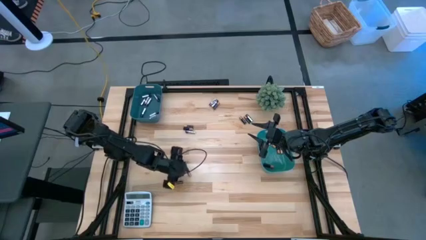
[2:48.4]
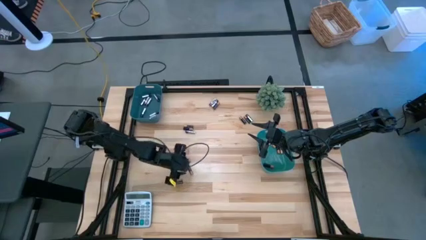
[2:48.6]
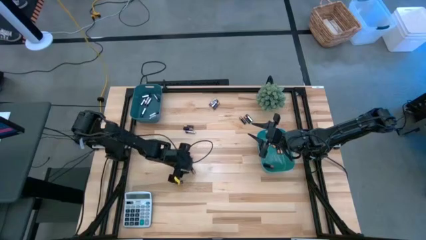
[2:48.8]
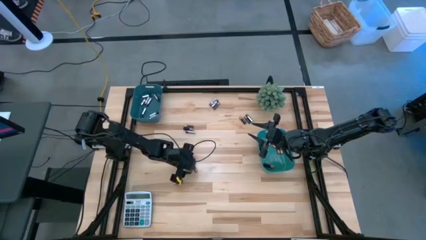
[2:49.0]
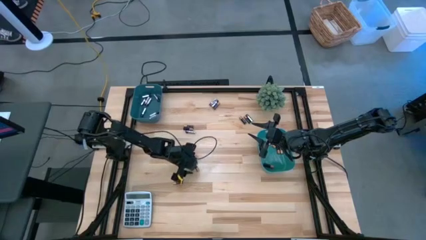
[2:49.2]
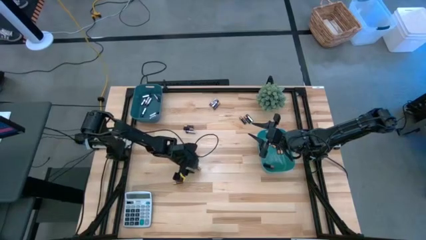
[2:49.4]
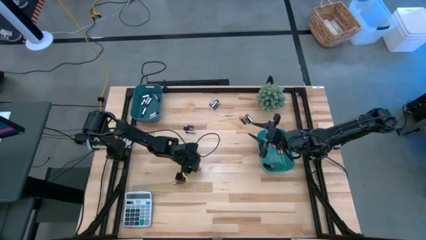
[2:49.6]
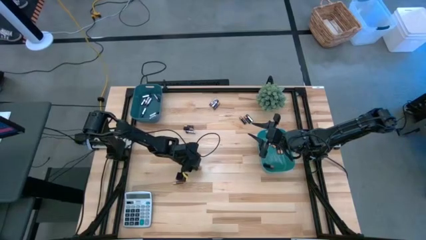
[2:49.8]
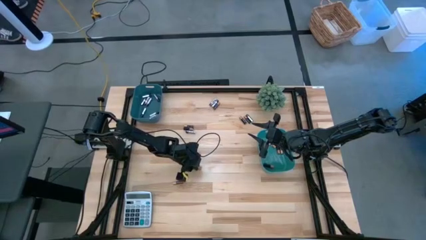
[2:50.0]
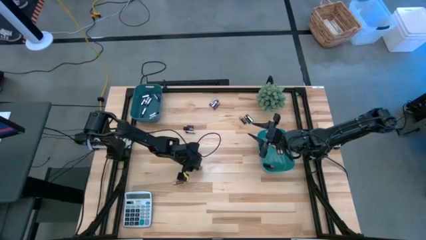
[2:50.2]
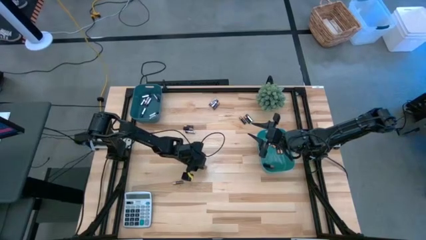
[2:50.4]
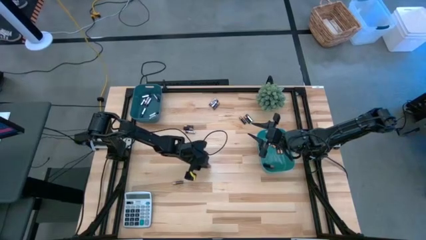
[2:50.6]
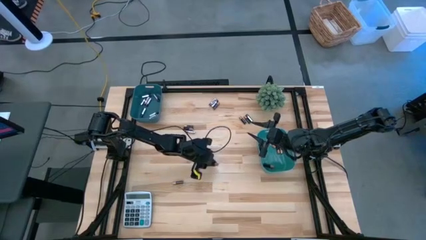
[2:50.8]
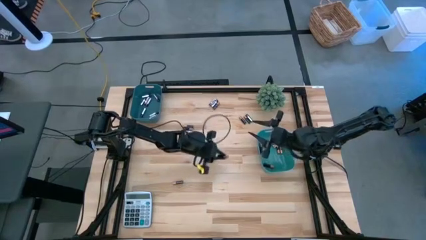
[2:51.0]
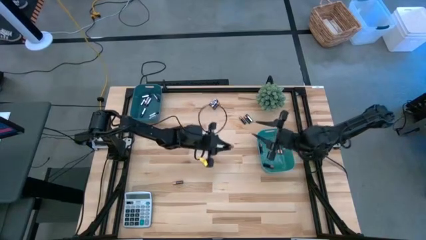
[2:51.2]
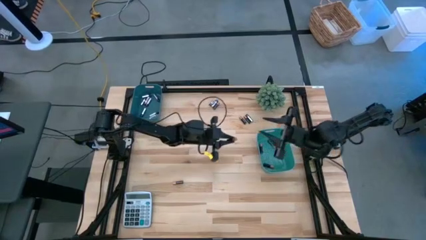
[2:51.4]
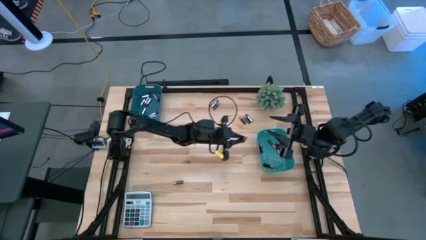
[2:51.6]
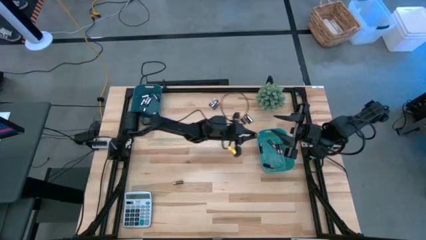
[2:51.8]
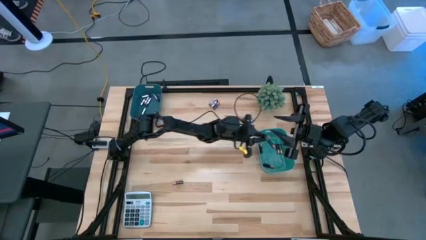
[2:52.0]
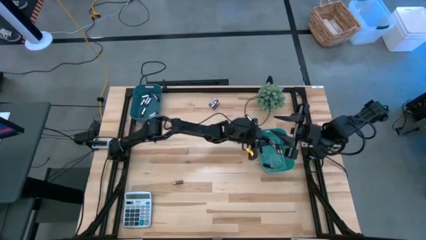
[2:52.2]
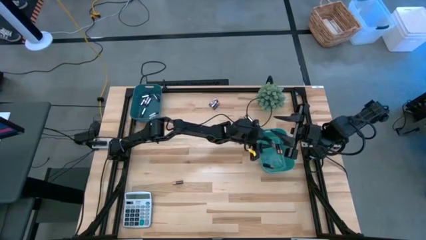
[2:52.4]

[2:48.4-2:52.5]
Task: Sort batteries
Put the black battery into the bin

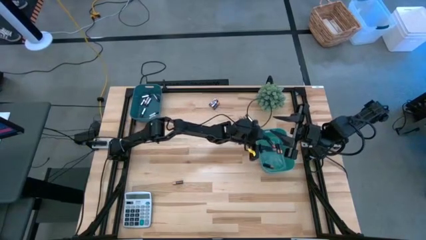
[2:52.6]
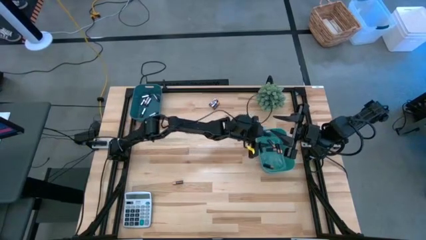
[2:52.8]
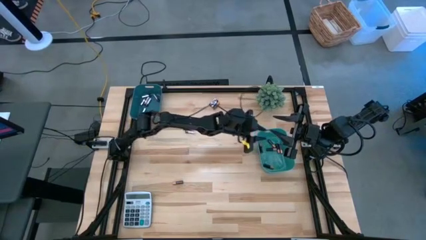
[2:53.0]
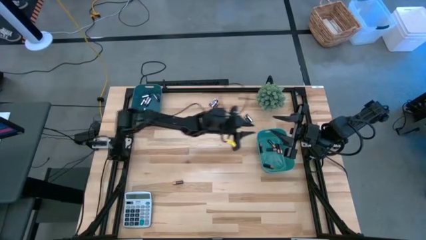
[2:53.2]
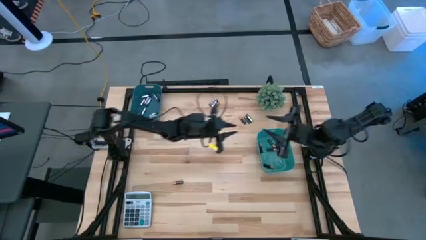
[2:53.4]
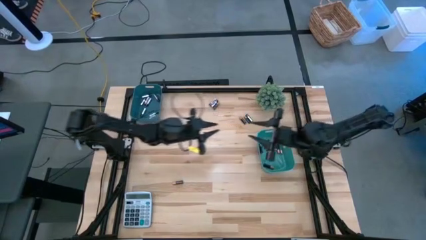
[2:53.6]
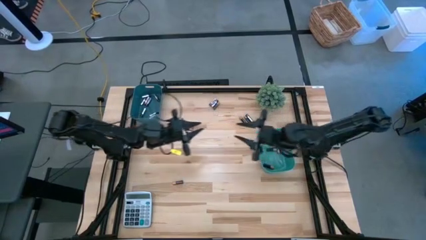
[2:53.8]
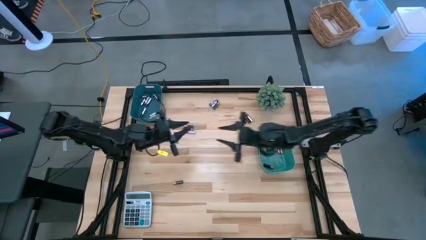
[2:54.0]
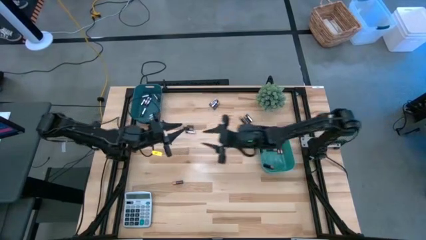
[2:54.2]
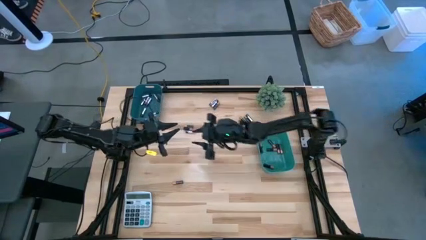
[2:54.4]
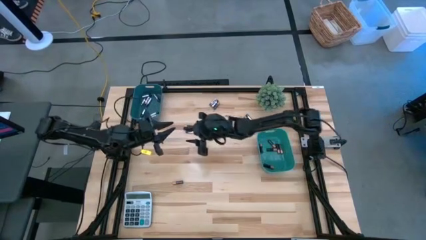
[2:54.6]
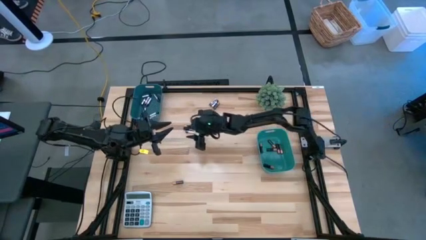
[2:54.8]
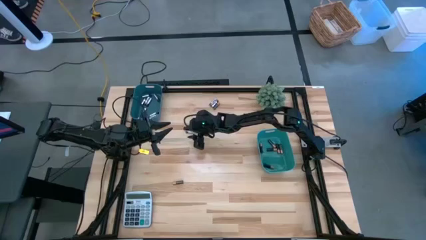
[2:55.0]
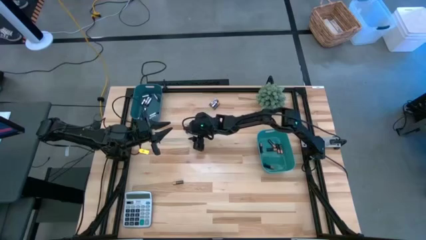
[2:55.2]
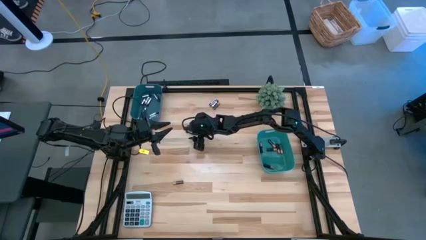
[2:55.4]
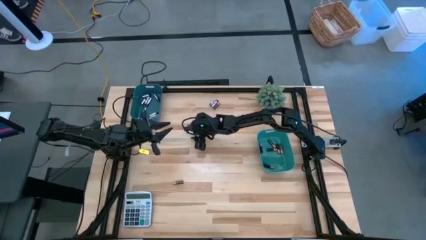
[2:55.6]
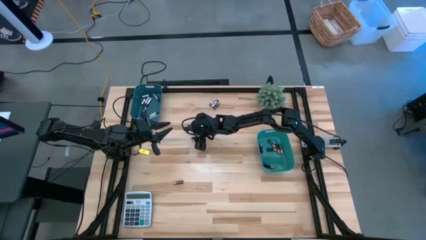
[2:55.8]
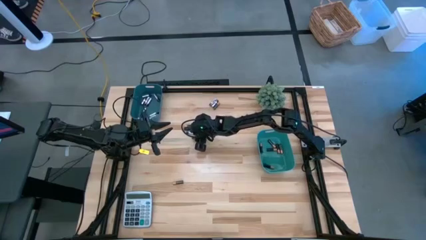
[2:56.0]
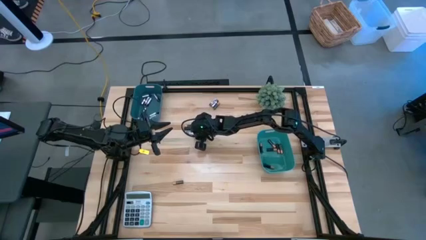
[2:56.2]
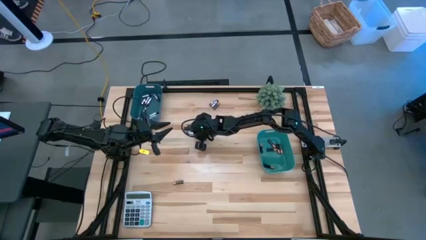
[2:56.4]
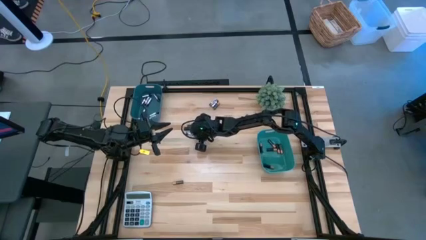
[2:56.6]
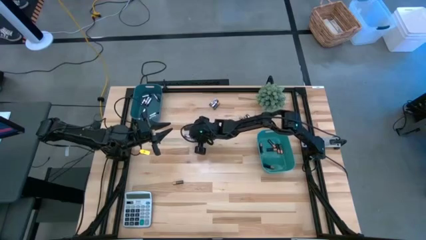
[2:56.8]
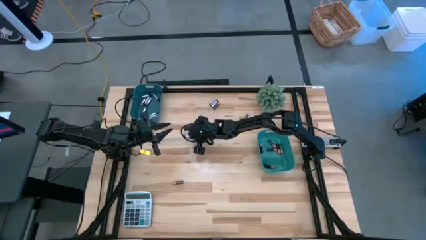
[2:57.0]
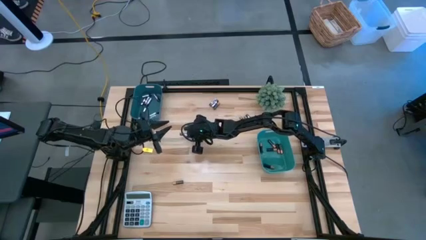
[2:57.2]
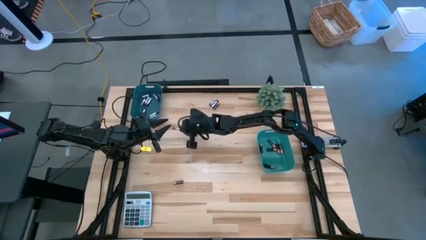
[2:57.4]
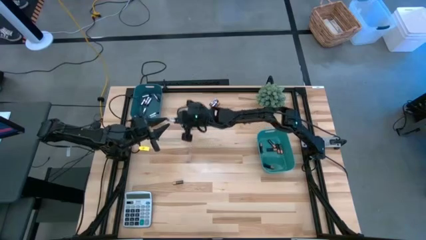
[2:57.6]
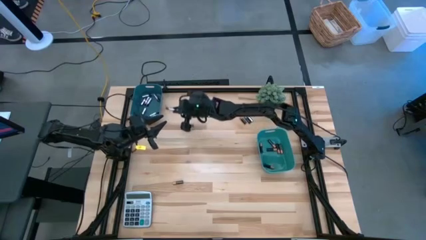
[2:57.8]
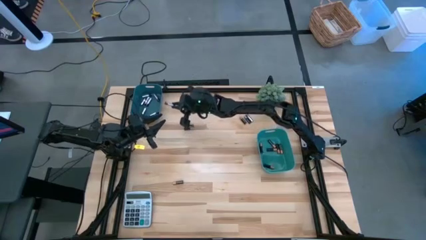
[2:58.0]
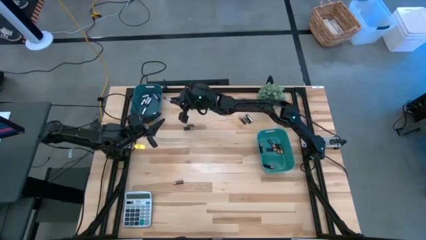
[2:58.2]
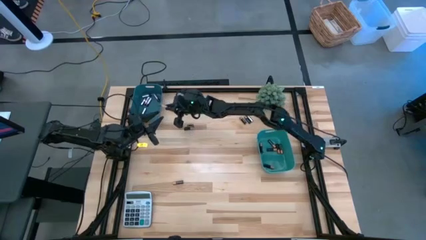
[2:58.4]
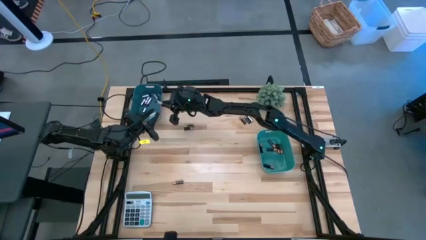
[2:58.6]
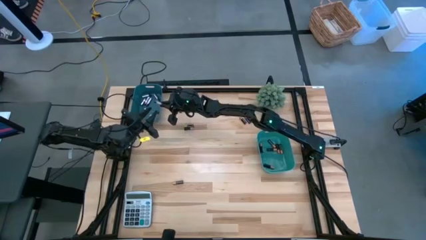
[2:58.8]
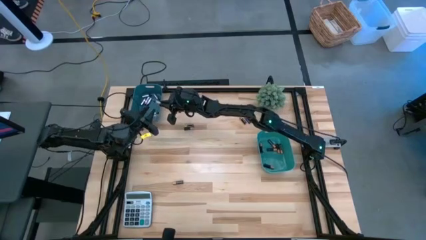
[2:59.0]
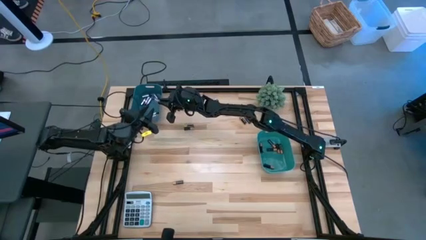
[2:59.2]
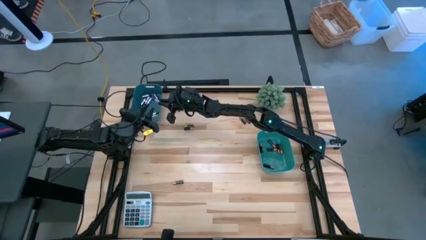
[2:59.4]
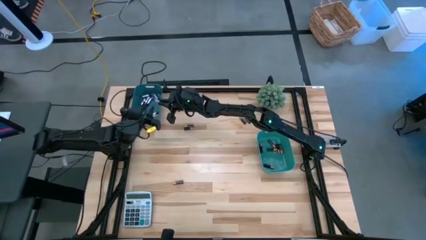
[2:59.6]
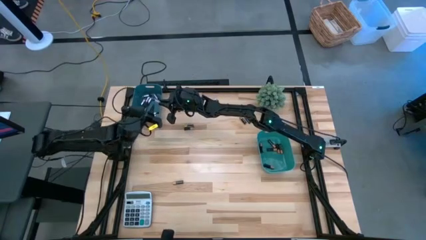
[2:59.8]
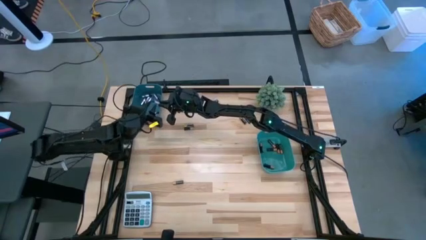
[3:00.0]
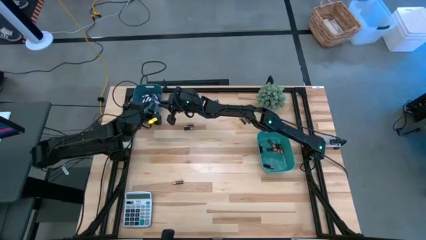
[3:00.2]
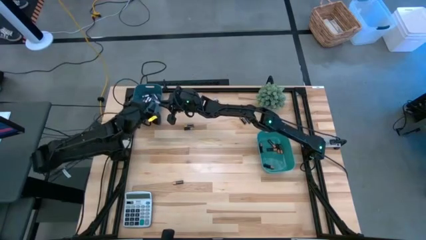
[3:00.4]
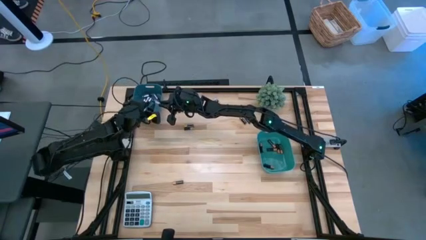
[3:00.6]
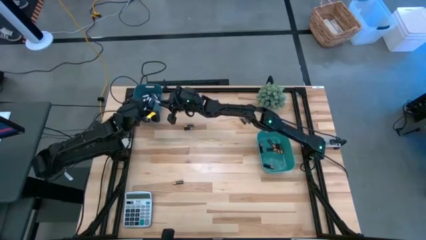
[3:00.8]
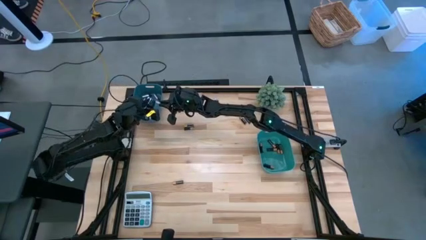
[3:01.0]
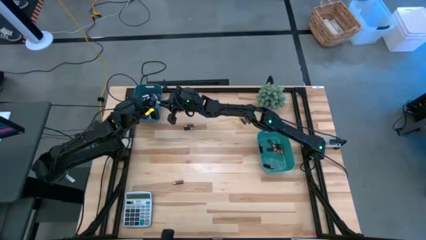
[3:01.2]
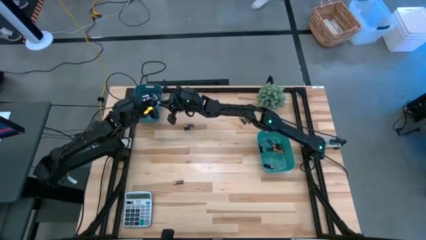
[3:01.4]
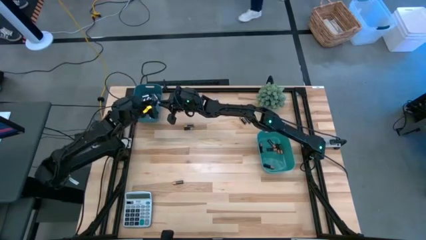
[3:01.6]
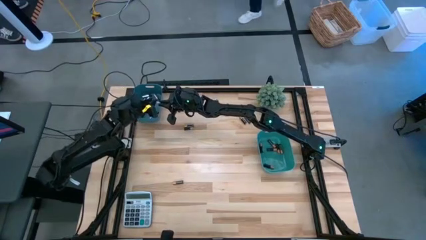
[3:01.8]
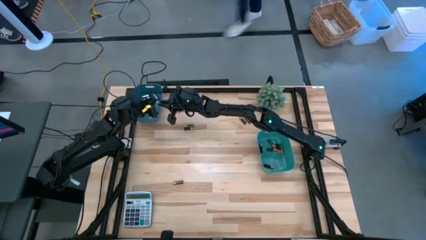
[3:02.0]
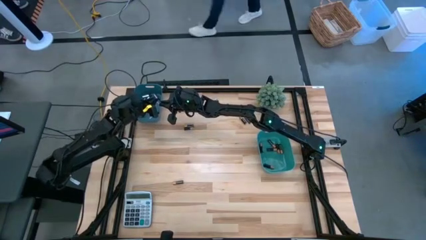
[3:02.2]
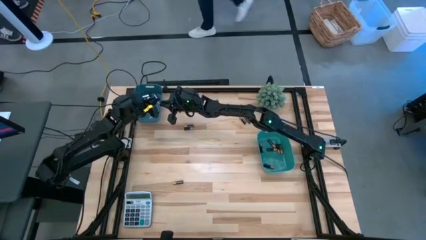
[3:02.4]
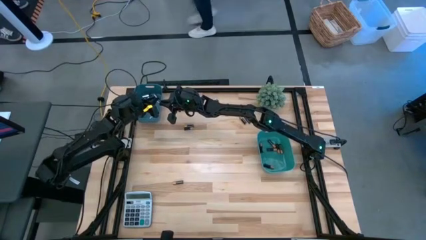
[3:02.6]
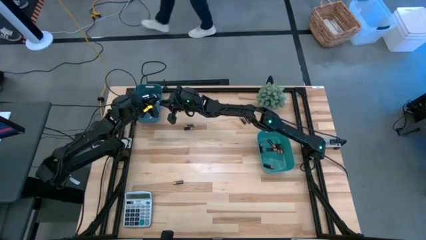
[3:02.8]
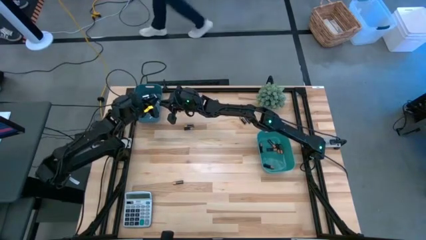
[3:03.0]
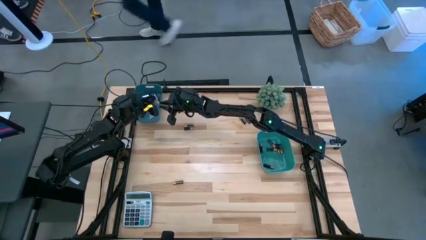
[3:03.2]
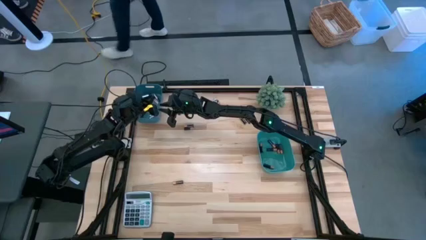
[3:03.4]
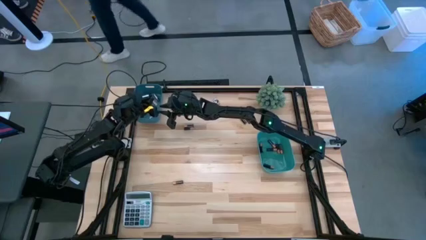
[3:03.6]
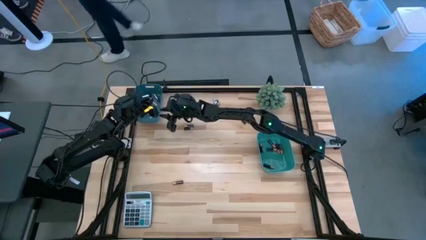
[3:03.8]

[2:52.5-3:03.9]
Put the black-silver battery into the blue bin
